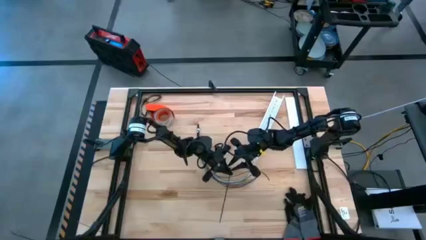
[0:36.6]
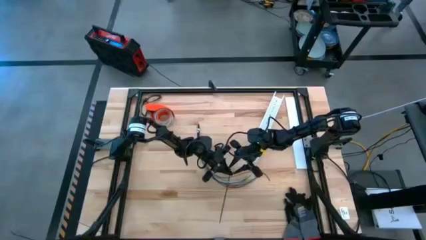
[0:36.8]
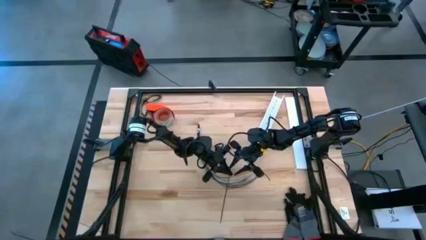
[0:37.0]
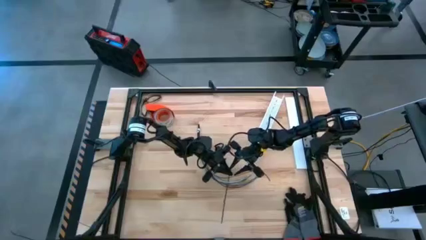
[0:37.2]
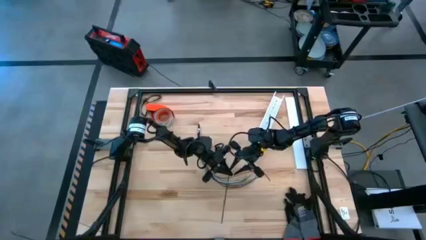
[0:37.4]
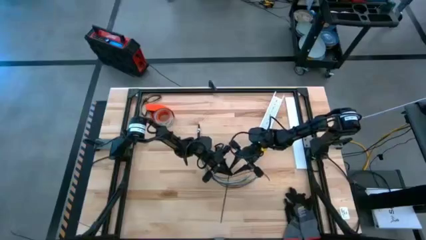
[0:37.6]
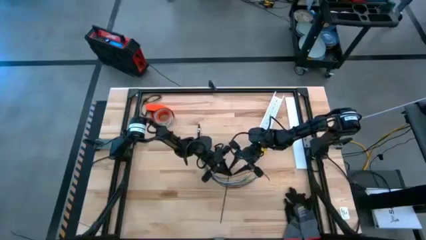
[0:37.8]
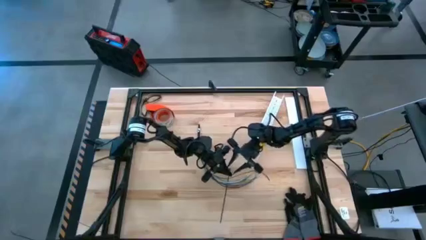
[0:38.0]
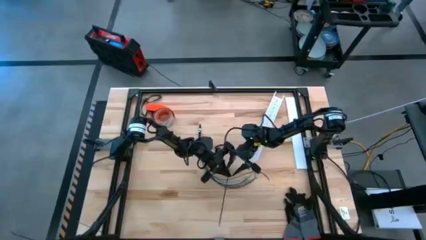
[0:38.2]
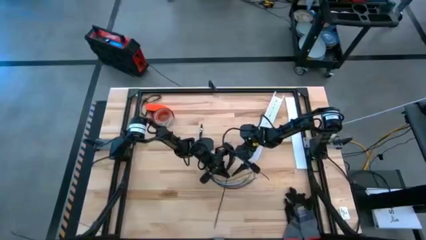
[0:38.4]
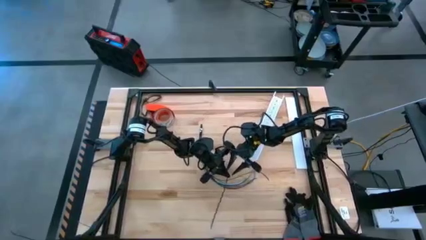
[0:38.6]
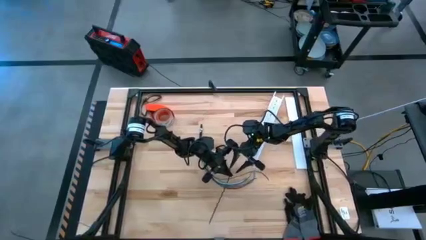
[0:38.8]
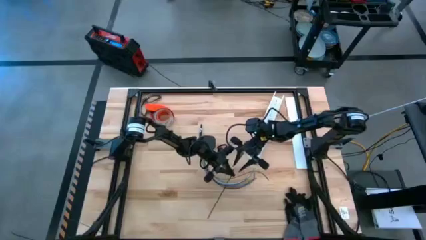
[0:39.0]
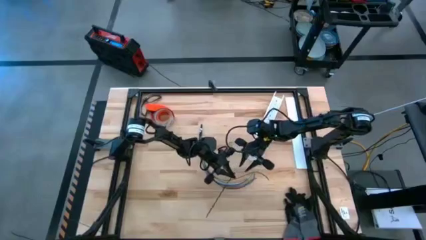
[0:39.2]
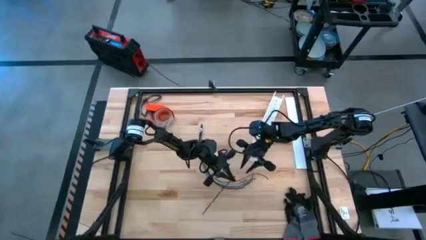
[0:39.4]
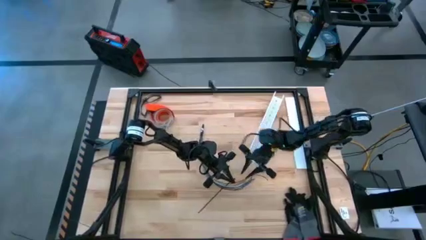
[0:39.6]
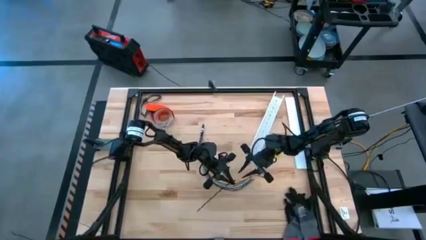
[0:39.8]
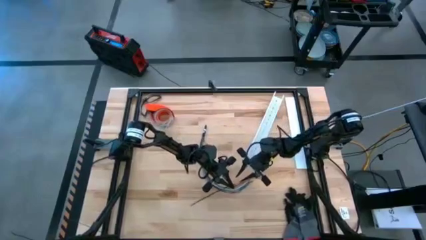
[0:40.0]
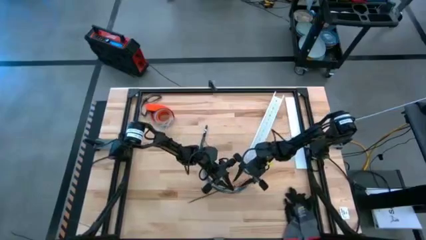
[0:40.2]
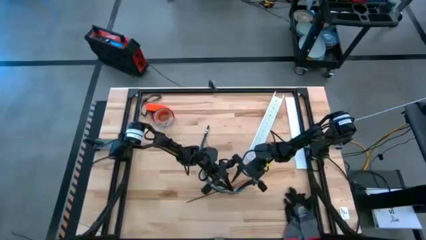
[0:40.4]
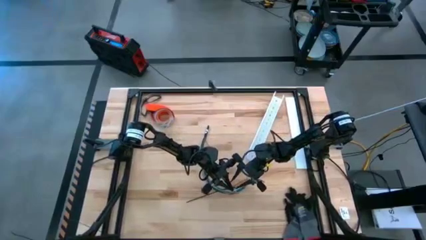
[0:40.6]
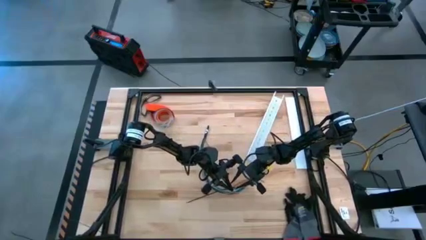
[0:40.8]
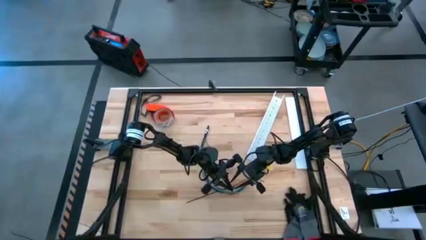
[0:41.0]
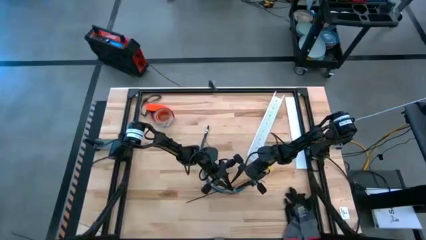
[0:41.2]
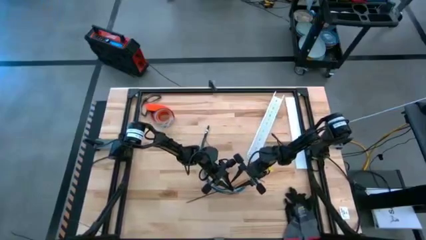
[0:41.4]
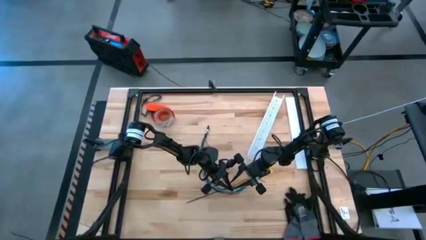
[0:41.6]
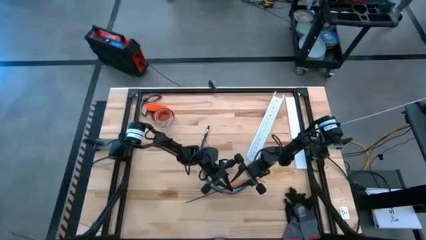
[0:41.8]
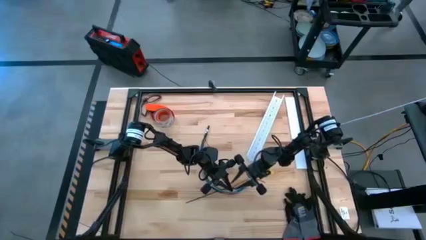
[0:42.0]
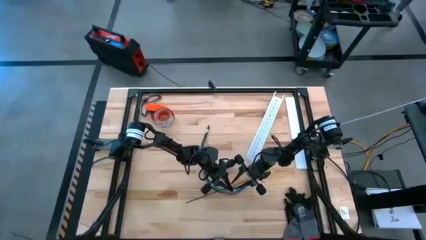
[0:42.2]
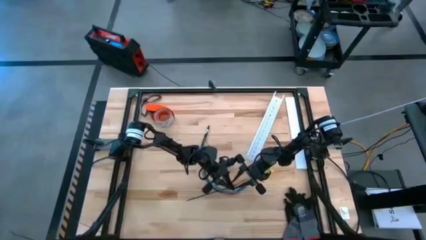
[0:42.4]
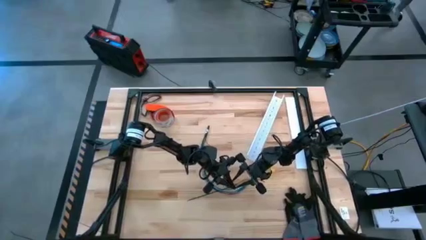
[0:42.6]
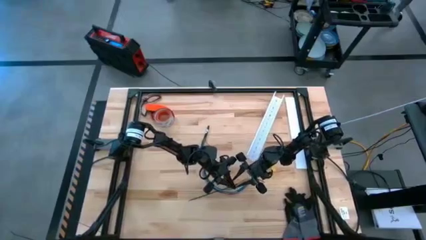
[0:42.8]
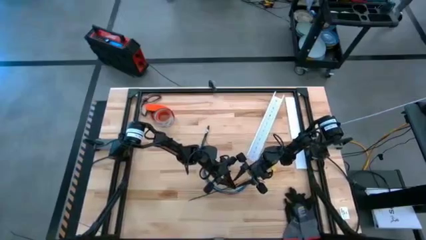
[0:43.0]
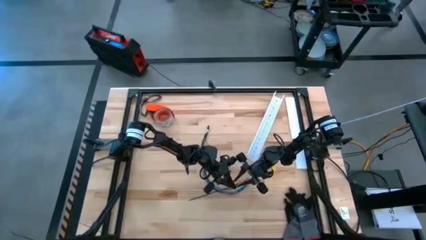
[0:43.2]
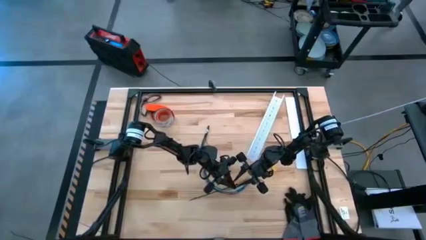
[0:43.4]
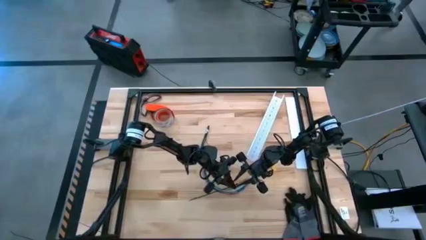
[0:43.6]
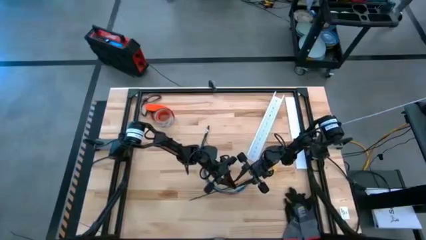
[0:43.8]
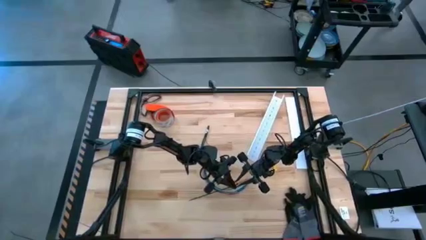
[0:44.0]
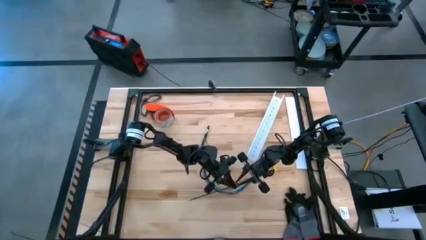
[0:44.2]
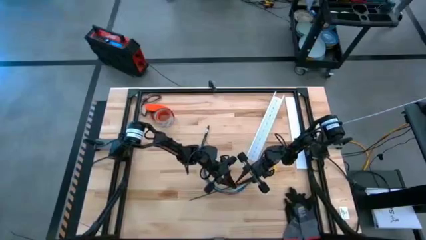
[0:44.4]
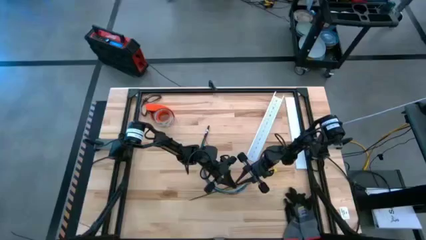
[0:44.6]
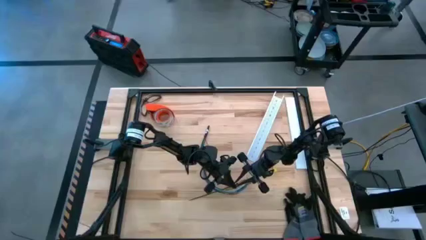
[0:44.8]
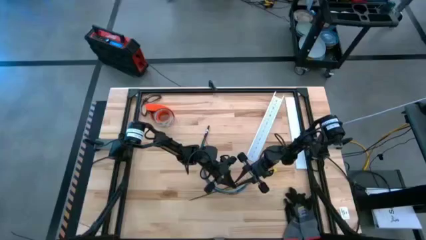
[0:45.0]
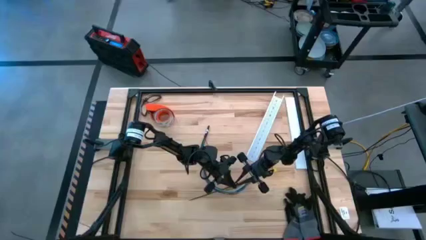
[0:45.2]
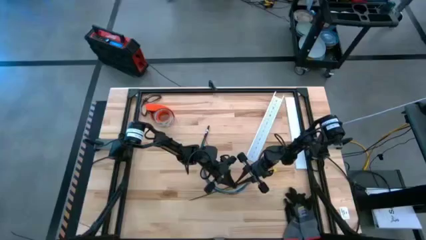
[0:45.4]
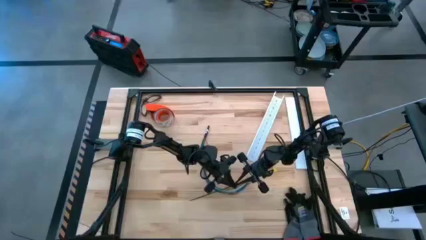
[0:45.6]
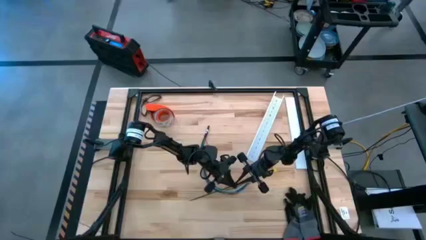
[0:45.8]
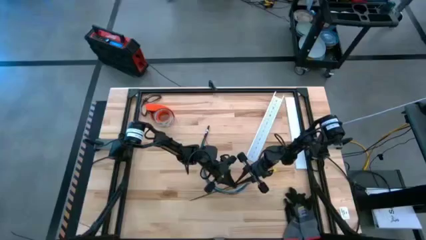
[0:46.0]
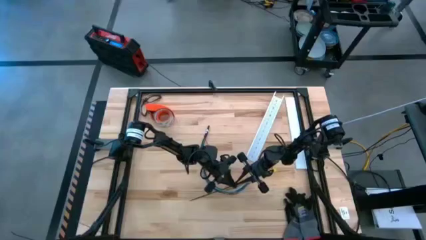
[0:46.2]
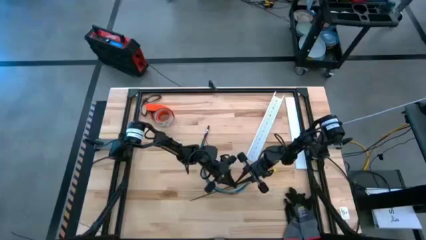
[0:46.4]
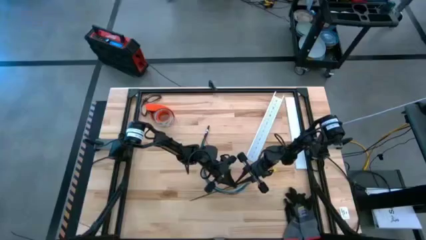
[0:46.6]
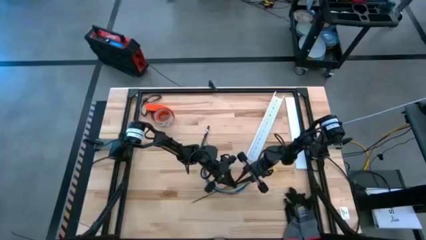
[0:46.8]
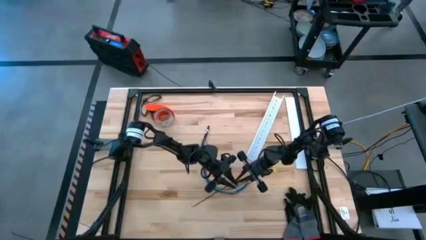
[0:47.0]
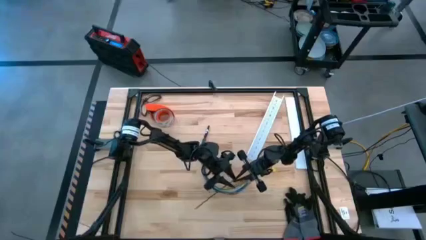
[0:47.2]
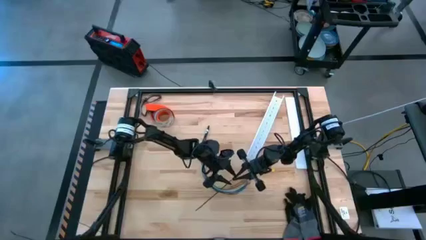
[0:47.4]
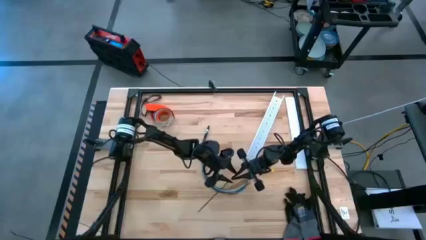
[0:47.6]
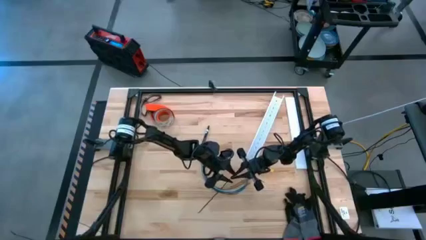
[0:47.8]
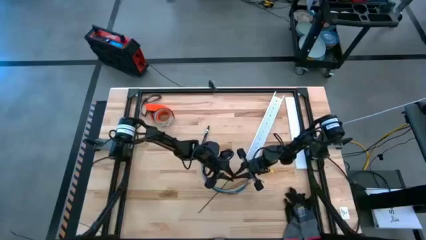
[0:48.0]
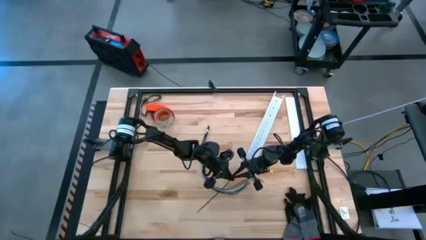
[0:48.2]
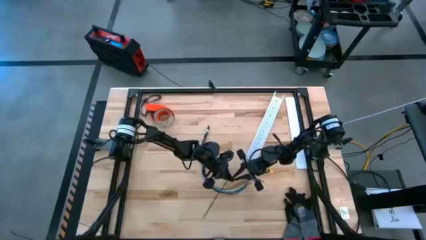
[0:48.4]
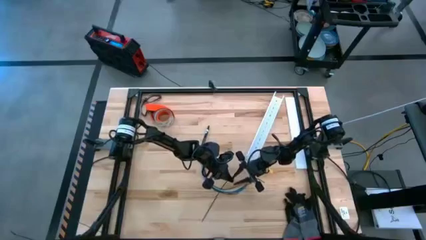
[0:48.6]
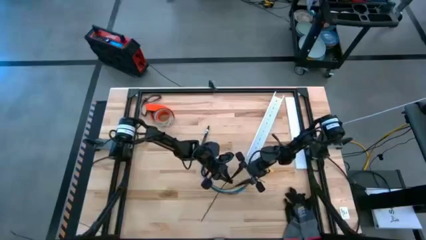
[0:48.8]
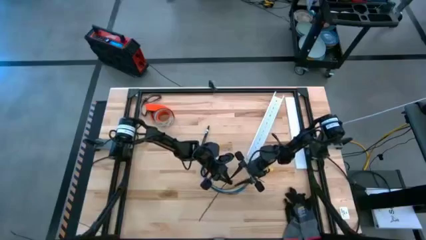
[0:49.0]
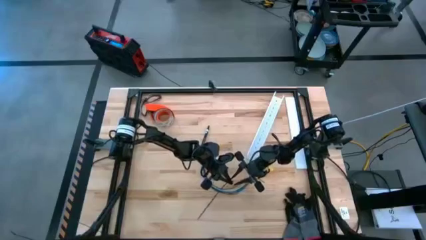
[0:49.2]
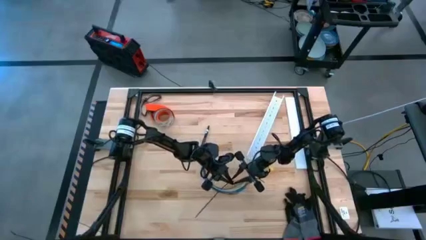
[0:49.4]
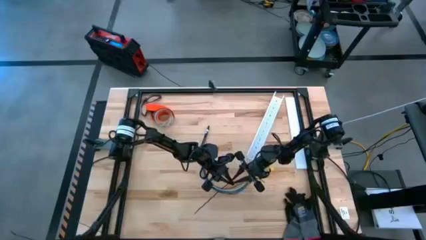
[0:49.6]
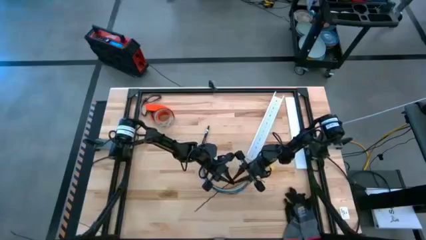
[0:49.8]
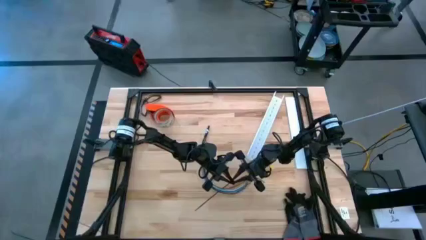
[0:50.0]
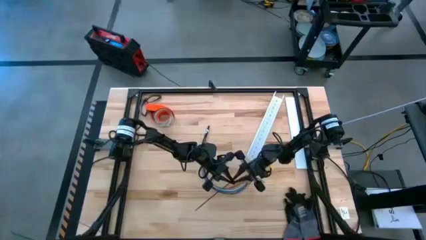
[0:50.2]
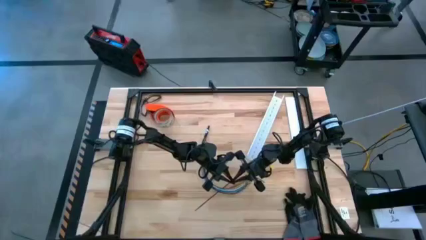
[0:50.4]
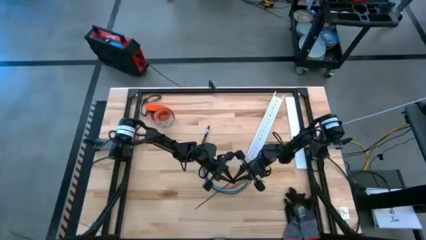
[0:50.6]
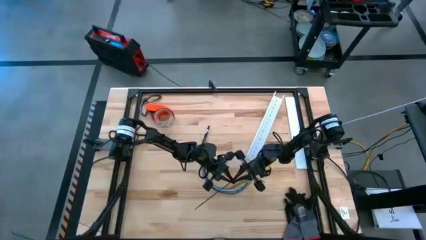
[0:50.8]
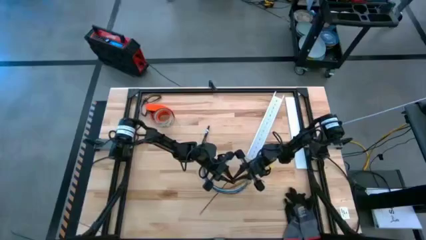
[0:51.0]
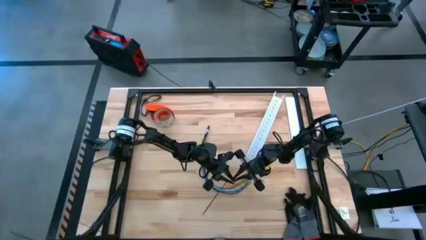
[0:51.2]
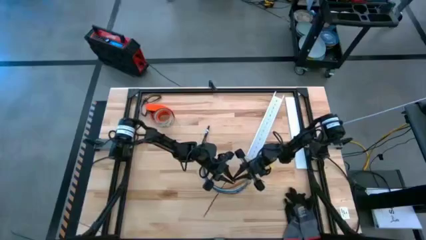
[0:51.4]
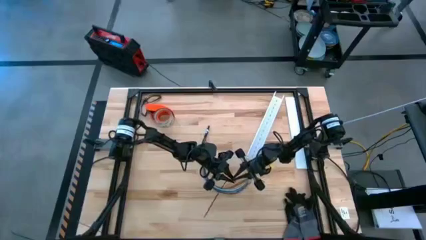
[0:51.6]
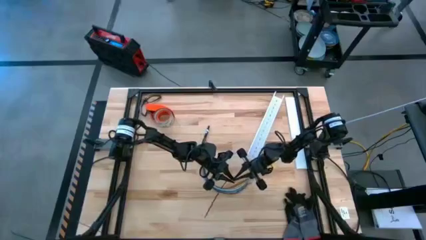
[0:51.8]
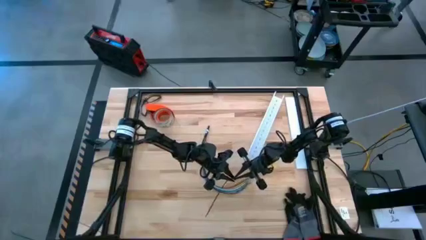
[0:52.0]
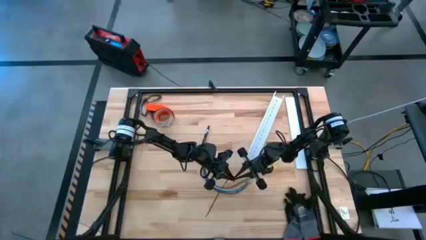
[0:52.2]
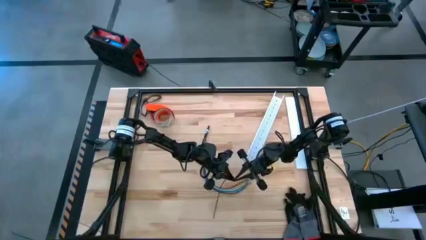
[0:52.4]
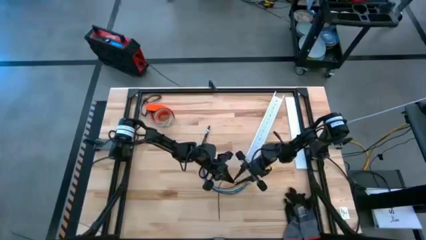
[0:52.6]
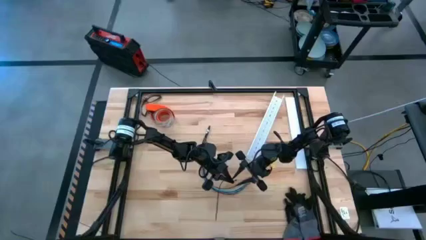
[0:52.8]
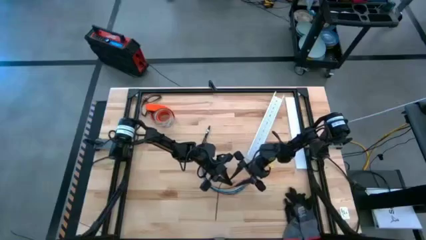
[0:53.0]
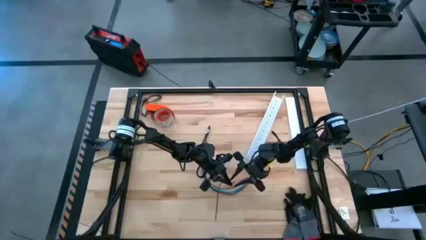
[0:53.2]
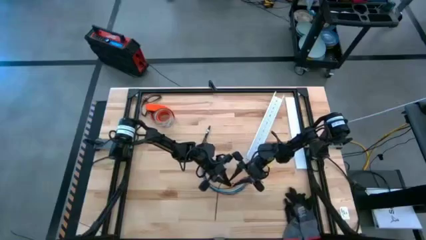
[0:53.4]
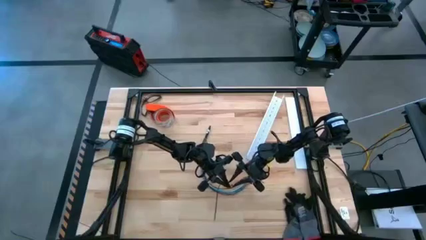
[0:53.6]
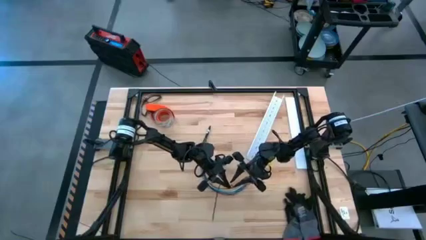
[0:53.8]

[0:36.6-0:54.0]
Task: Ziptie cables
Wrap the cables together using a black zip tie
